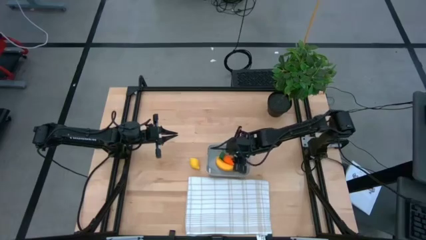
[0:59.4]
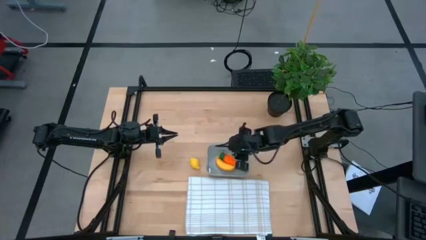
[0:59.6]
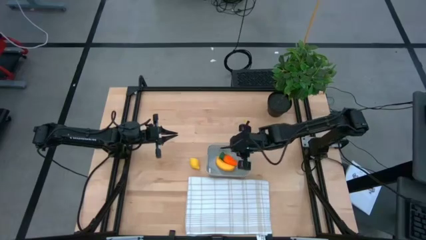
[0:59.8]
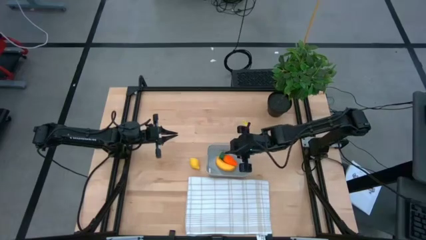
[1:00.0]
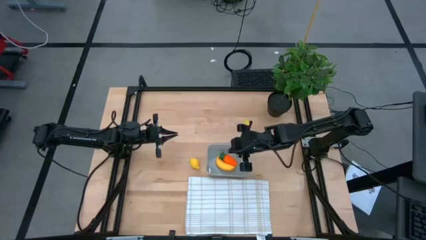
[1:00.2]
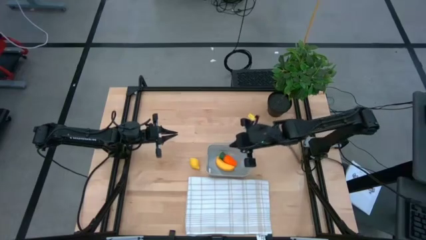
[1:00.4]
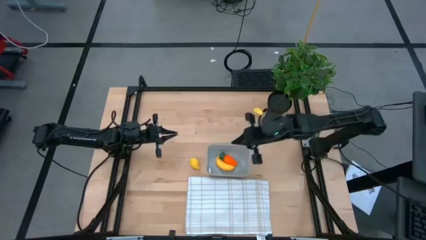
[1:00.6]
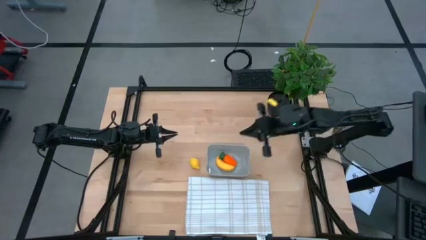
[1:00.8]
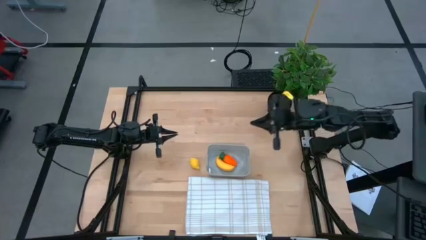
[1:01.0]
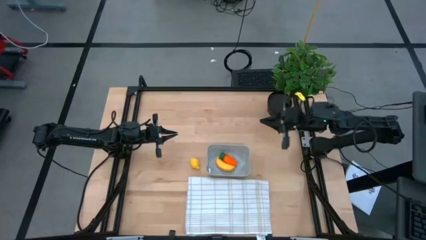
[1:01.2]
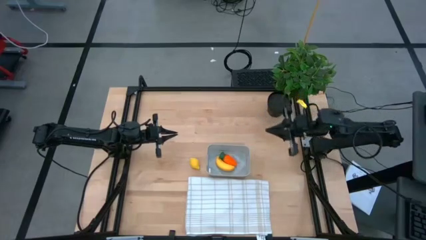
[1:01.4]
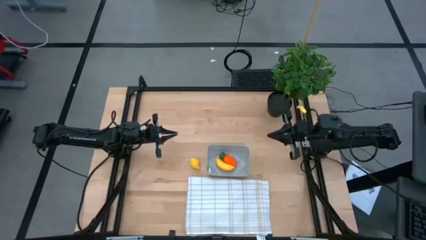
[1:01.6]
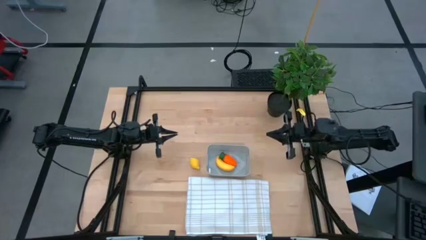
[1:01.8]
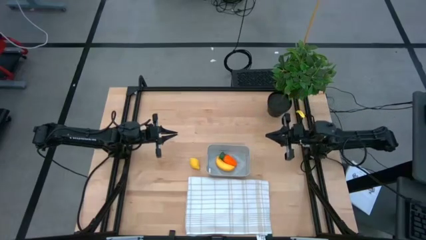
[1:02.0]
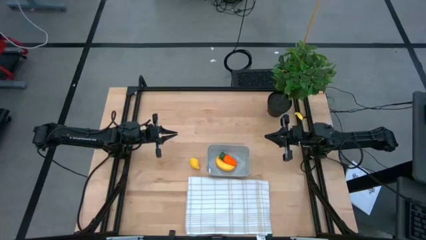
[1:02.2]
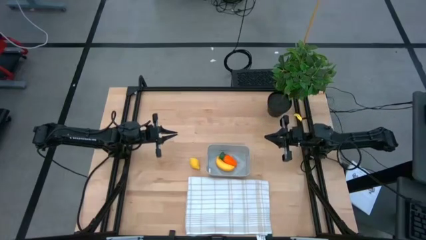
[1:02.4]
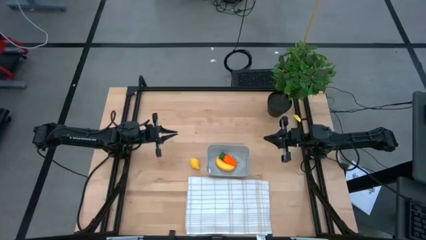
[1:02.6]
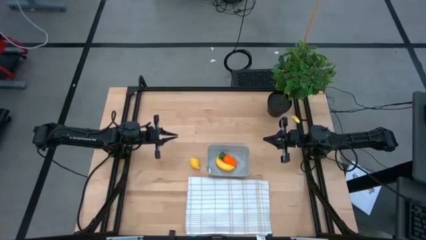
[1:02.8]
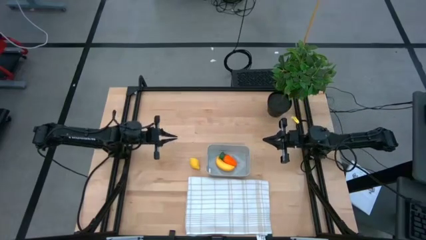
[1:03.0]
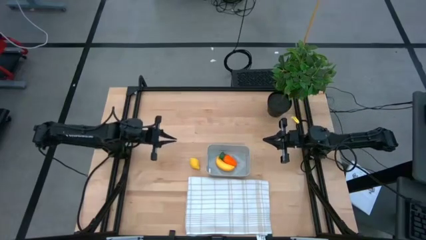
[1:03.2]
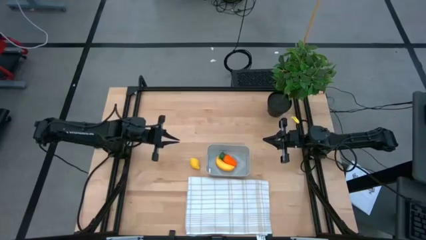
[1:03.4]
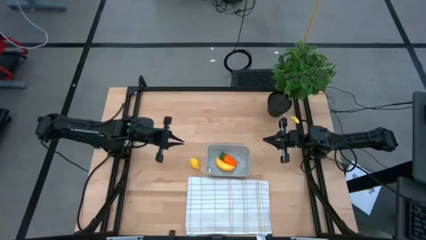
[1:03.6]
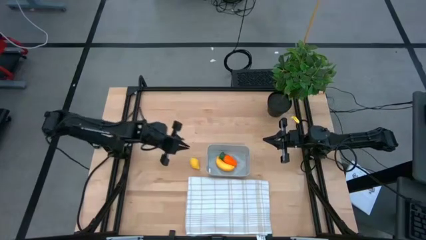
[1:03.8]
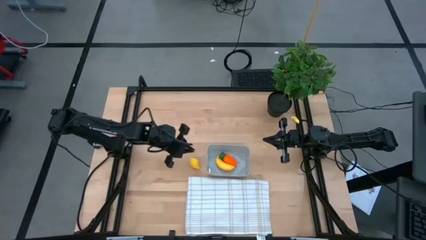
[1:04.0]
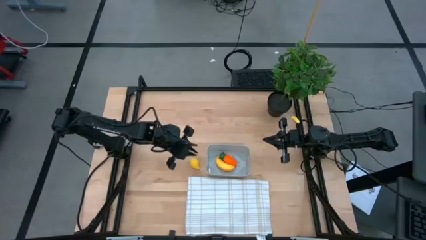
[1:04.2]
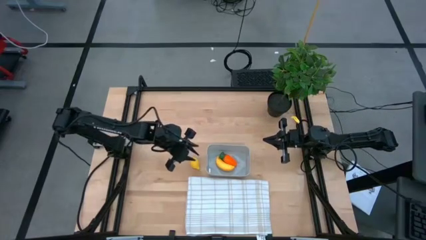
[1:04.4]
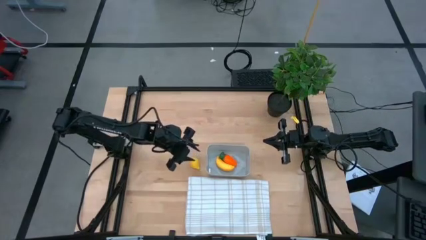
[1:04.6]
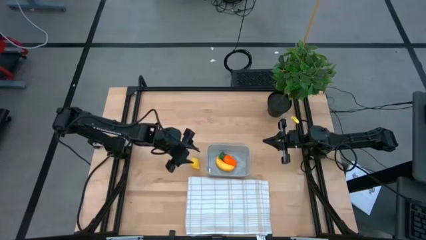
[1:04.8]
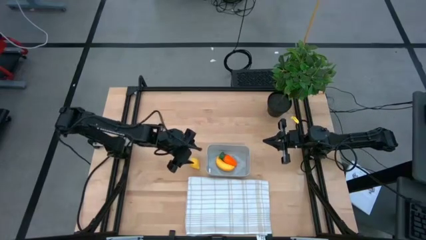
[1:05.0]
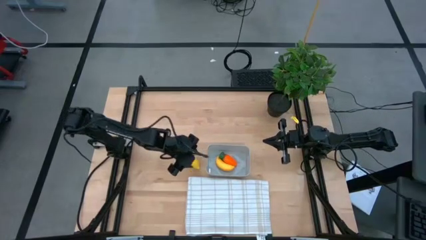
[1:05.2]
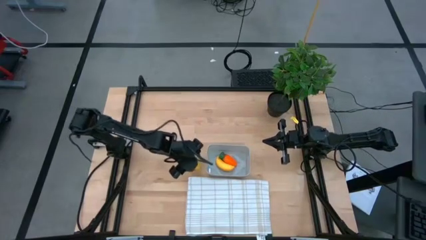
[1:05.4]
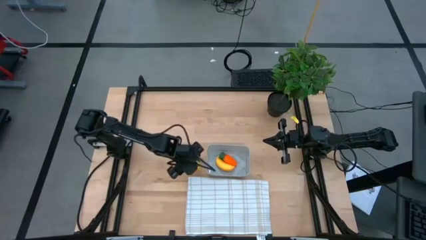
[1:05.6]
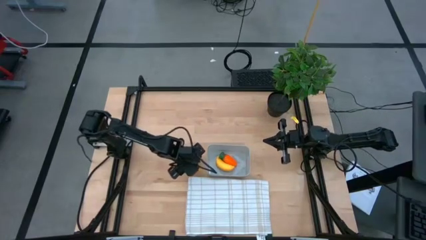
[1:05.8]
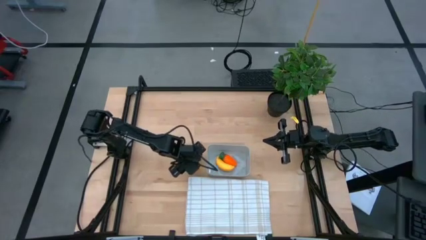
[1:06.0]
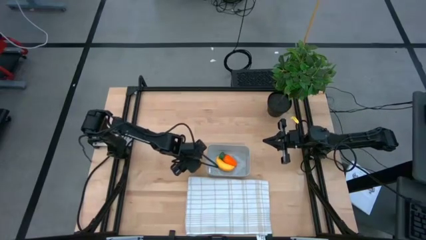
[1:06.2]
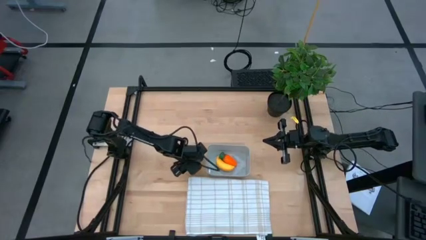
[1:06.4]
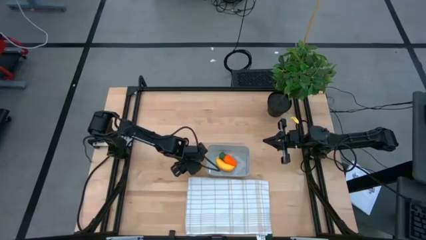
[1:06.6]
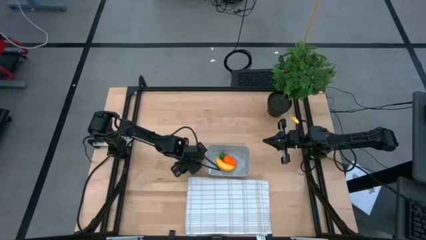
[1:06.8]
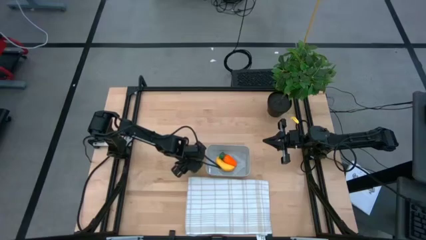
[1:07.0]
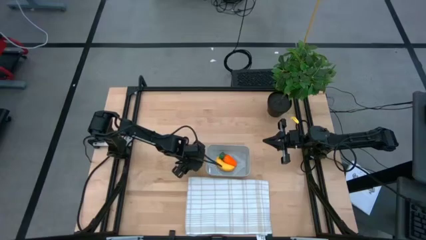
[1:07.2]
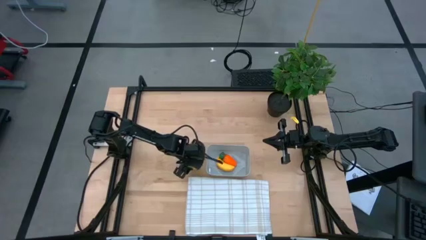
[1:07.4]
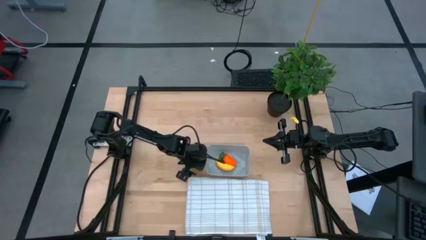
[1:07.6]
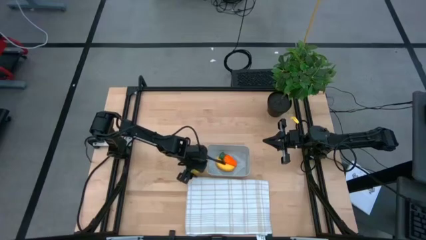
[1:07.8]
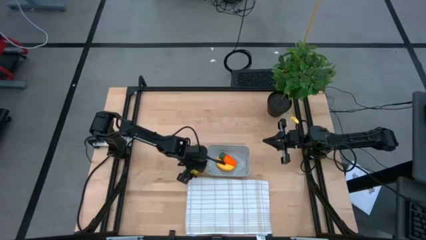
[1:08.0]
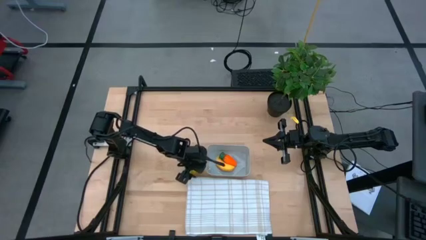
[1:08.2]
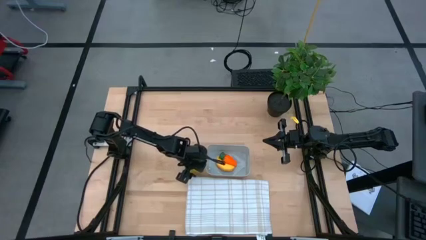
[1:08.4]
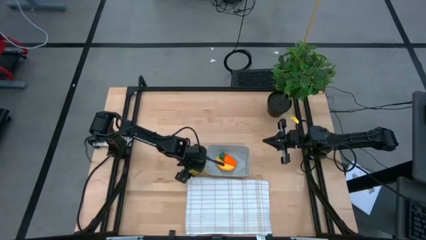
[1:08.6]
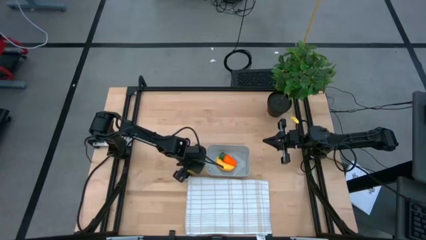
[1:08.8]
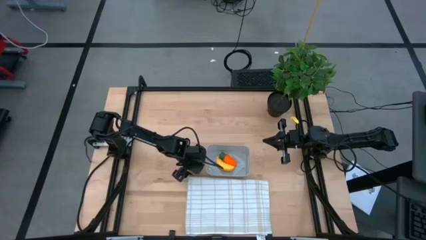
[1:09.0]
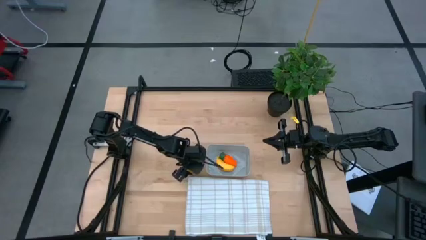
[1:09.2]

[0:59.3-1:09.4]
Task: Pick and placing Produce into tupperware
Put the yellow lemon into the gray bin

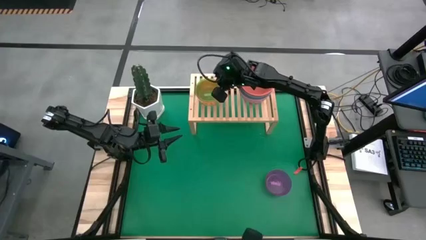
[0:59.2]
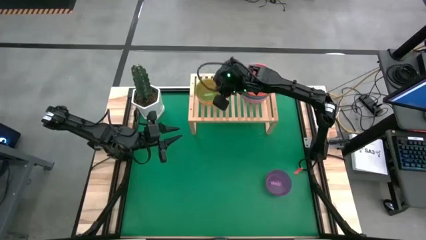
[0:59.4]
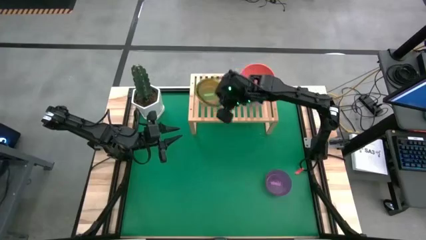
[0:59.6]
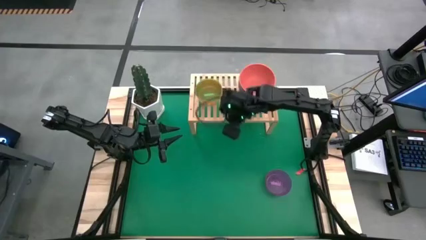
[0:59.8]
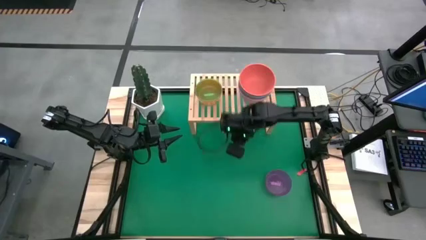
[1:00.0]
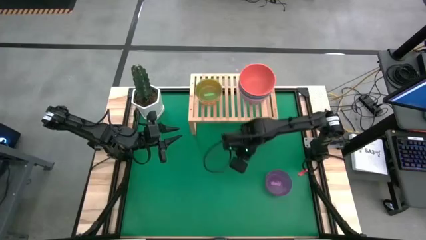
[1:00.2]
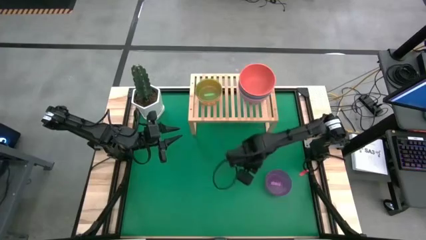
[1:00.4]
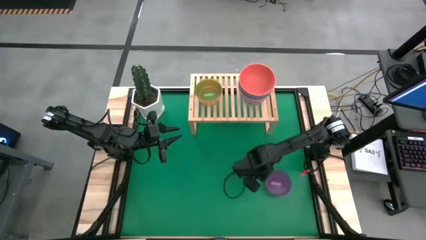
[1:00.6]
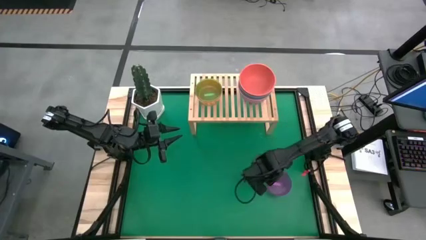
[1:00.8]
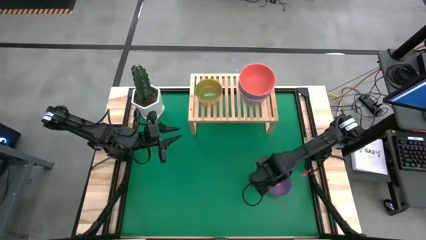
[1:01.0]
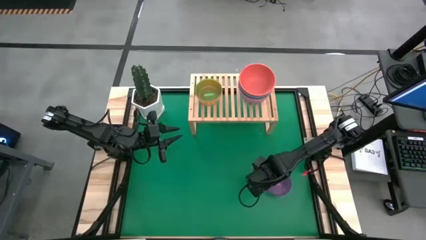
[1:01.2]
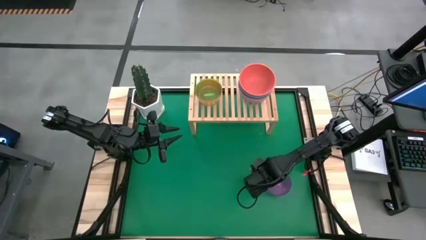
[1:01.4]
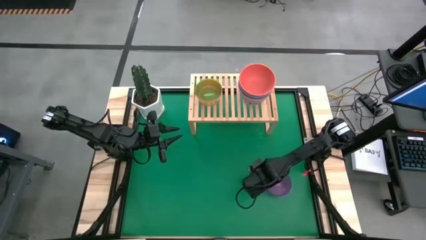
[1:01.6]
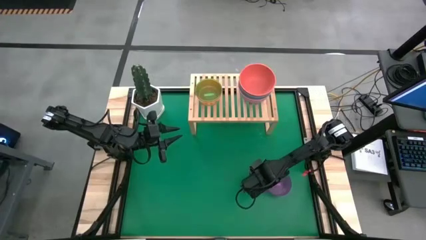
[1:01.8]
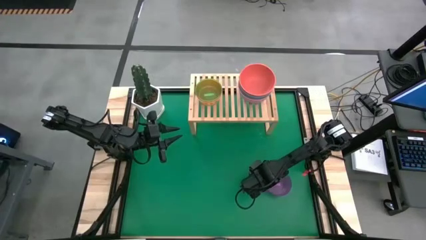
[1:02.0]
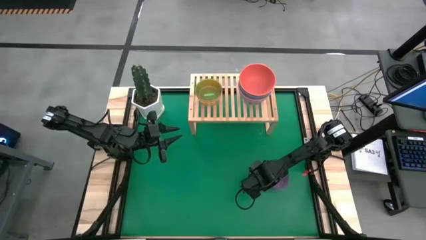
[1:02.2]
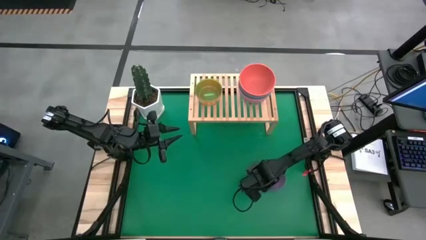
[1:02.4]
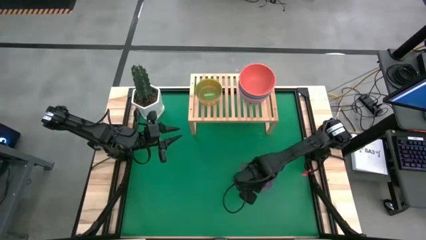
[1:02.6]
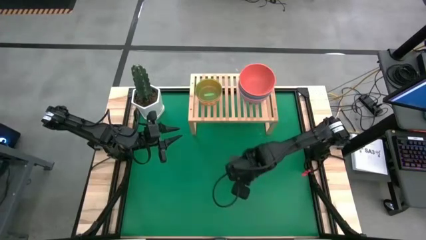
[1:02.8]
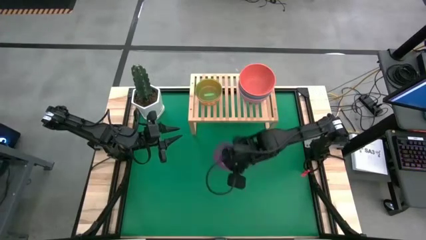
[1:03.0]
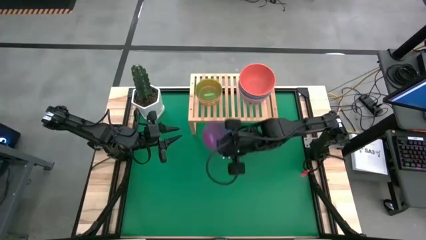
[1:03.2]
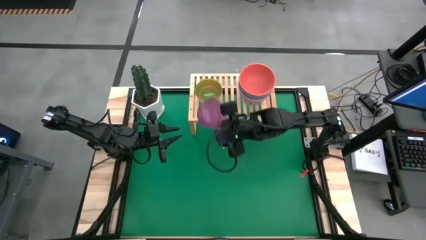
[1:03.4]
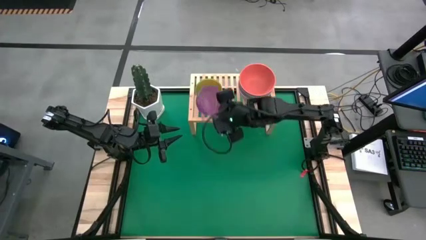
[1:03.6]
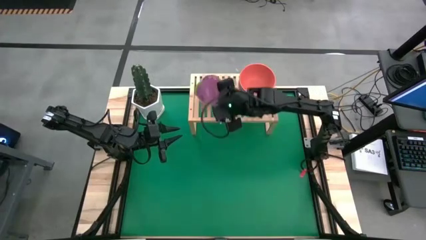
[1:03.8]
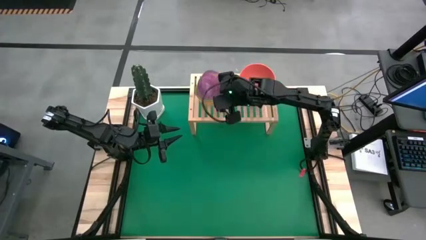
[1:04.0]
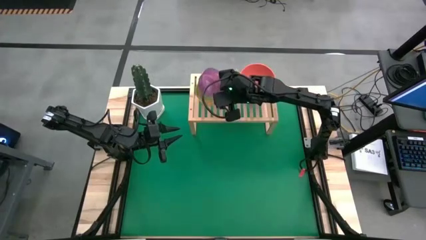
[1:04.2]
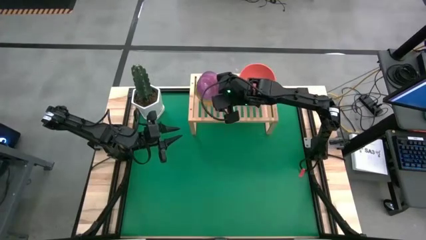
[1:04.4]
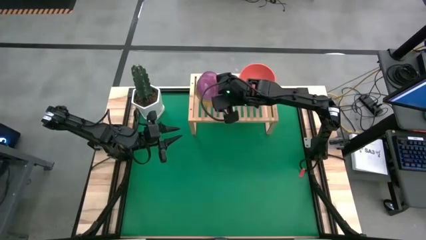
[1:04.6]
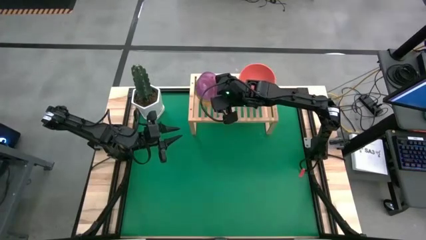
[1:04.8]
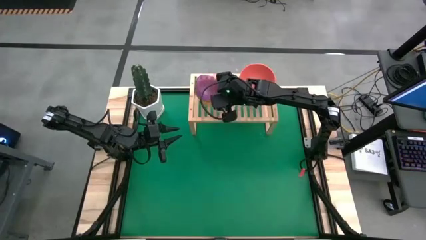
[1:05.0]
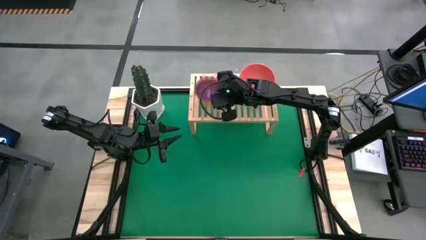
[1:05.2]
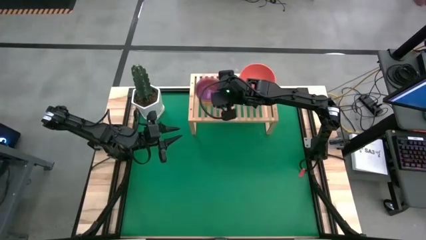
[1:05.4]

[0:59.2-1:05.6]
Task: Place and stack bowls onto a shelf
Stack the purple bowl on top of the green bowl on the shelf
